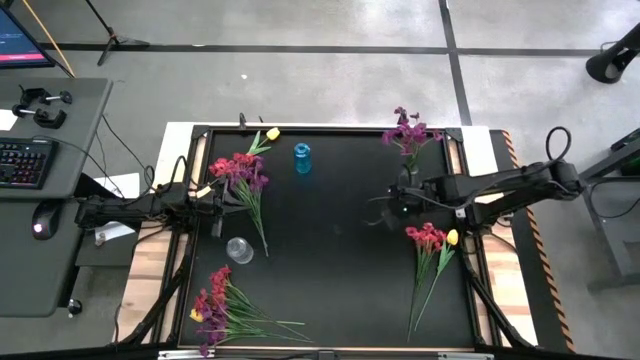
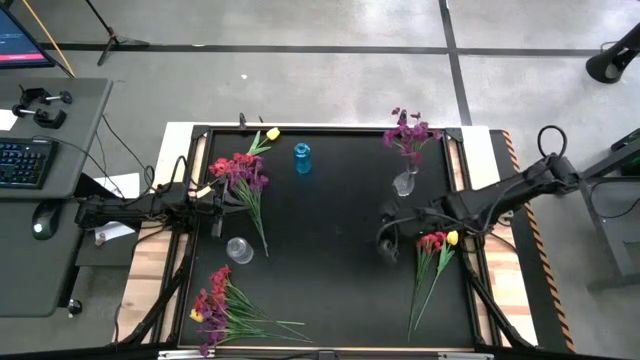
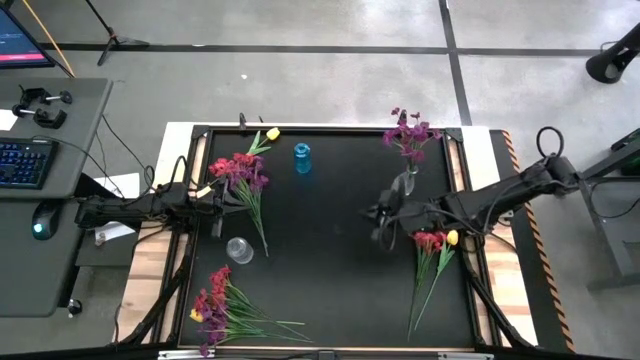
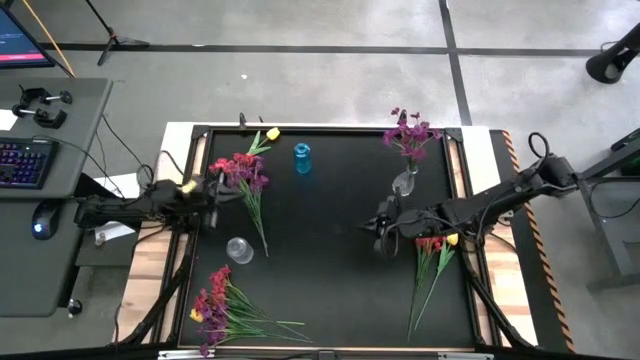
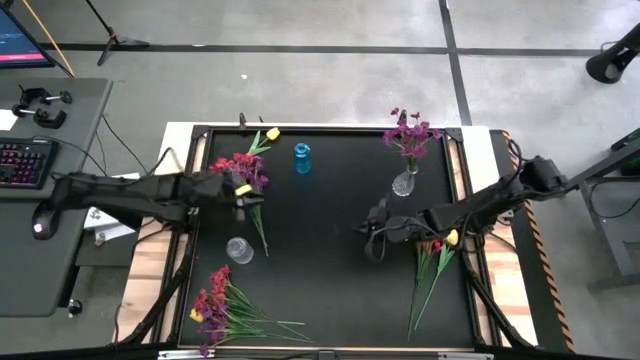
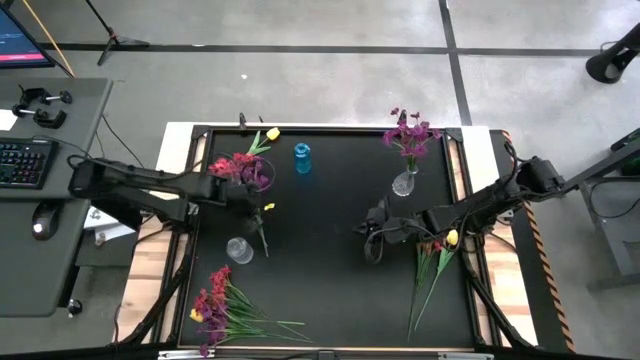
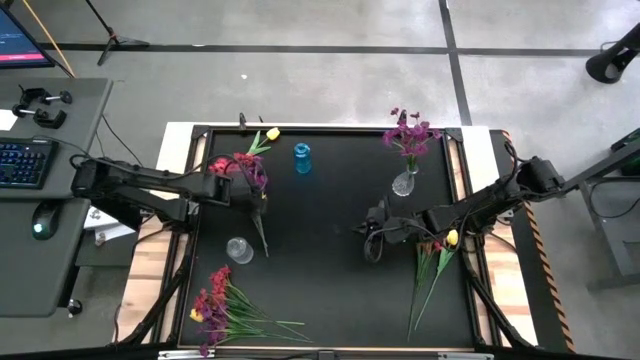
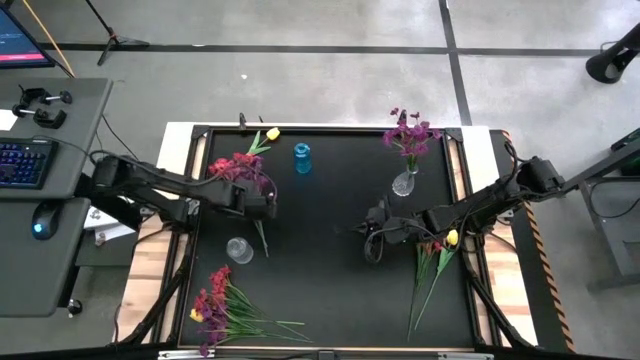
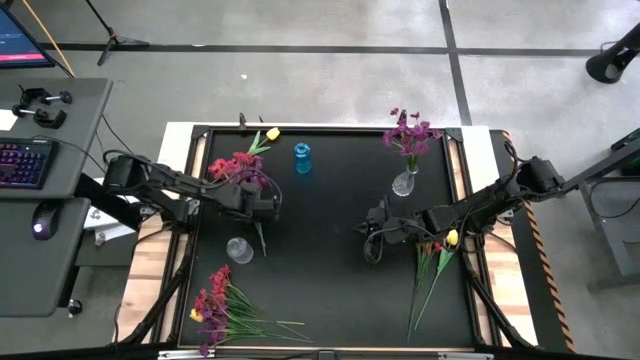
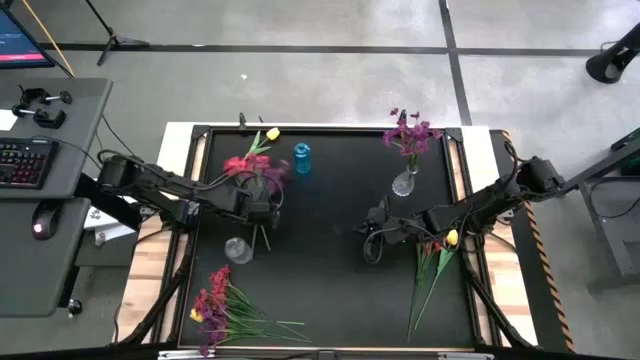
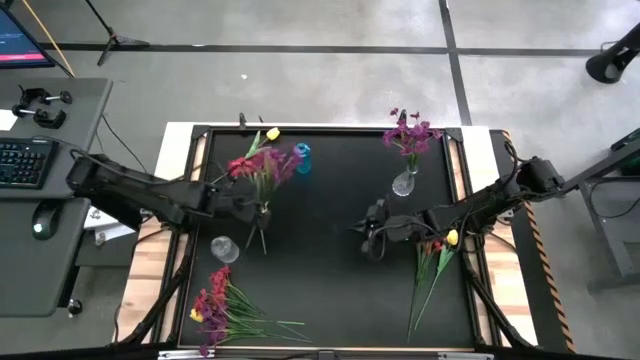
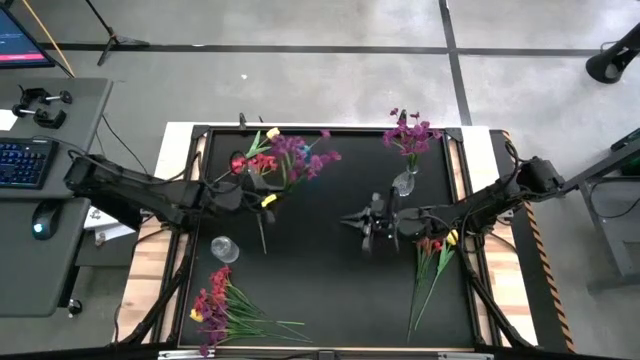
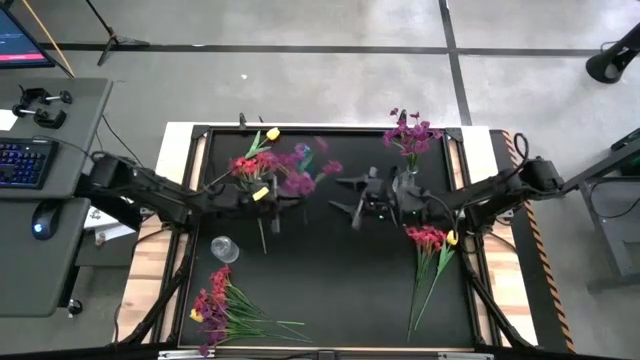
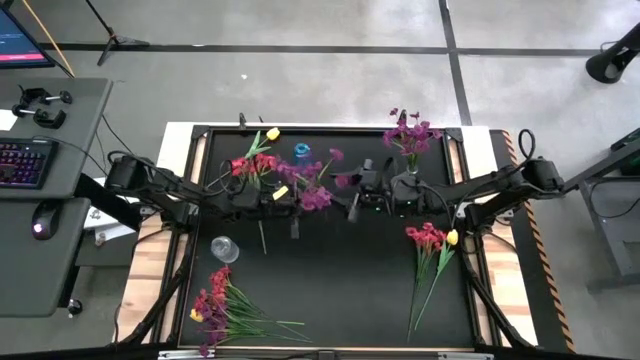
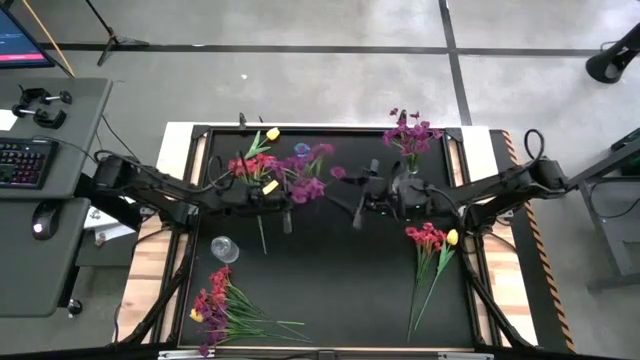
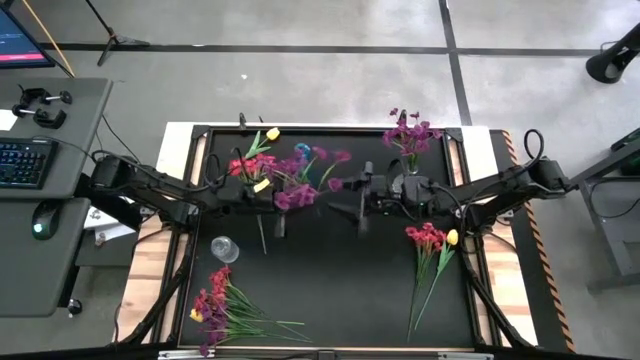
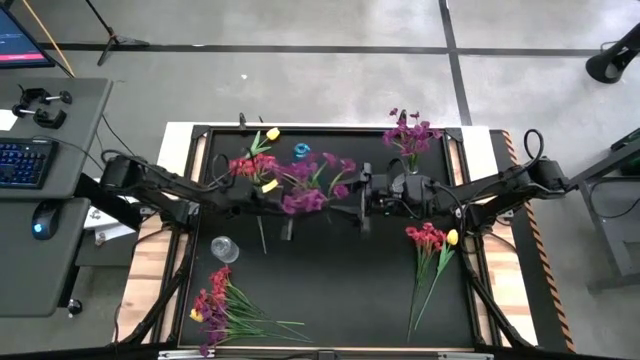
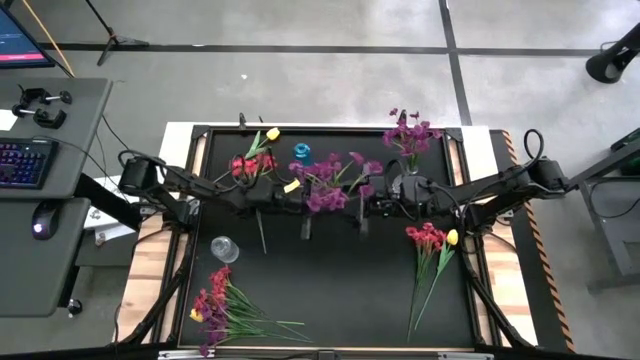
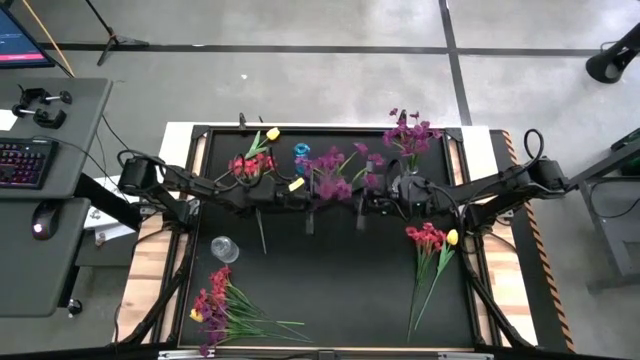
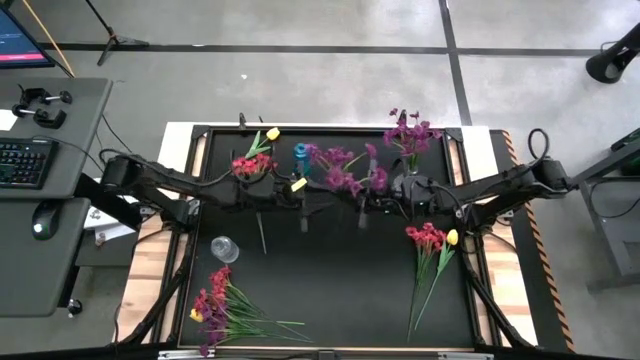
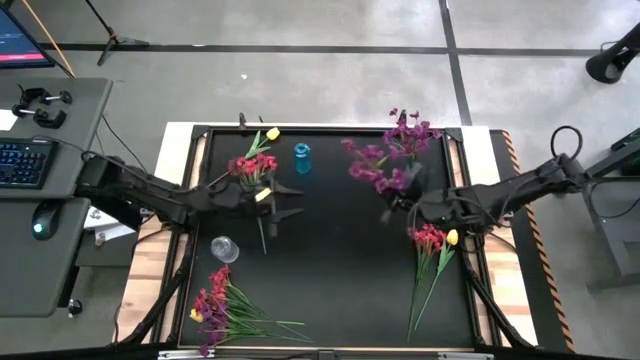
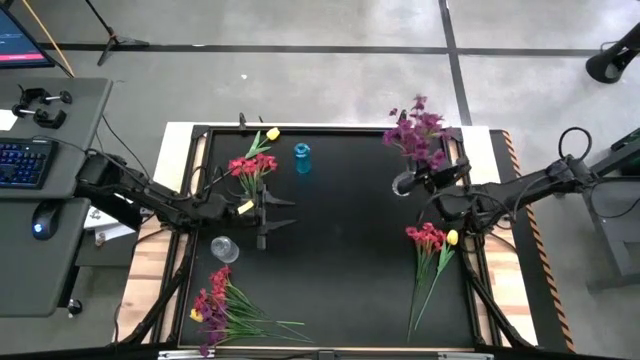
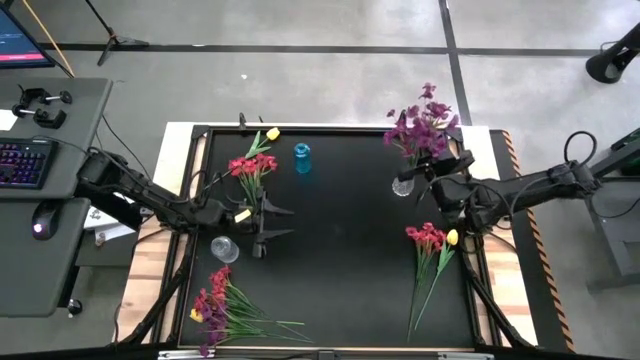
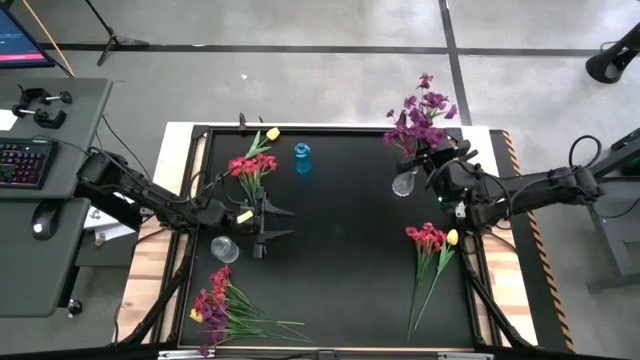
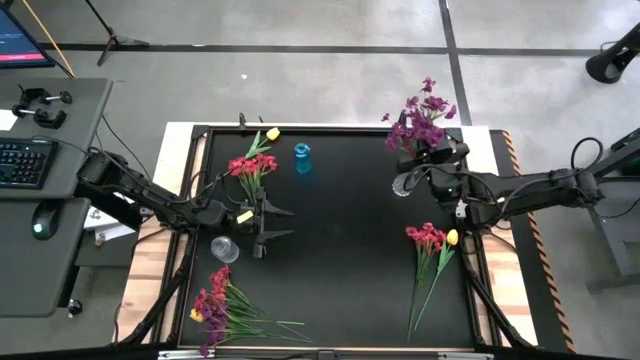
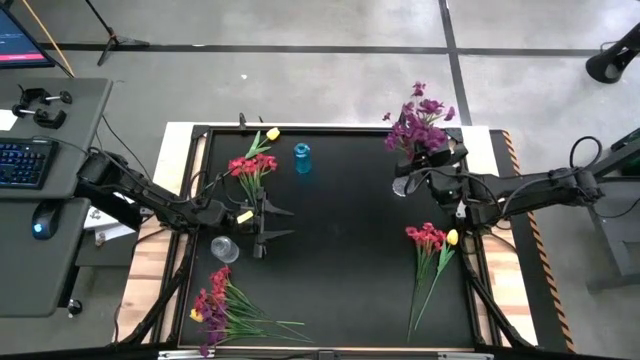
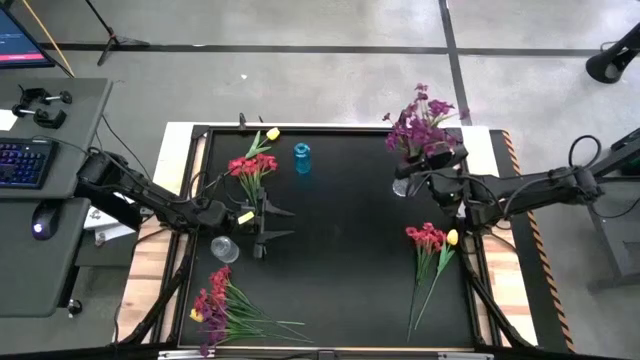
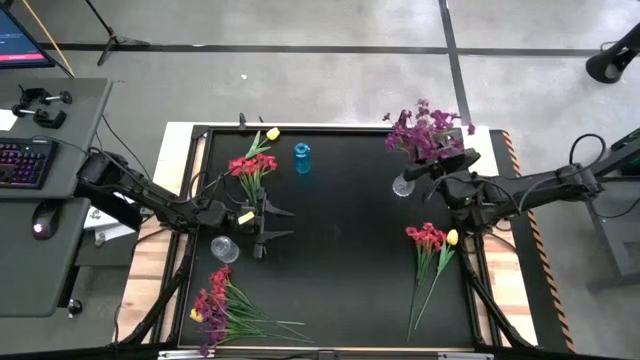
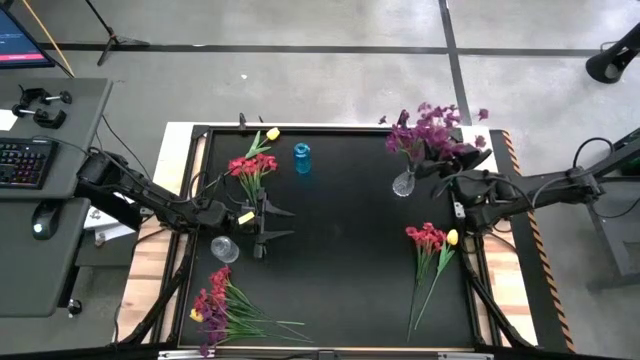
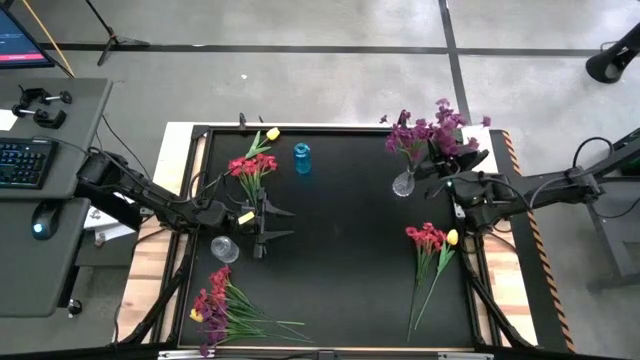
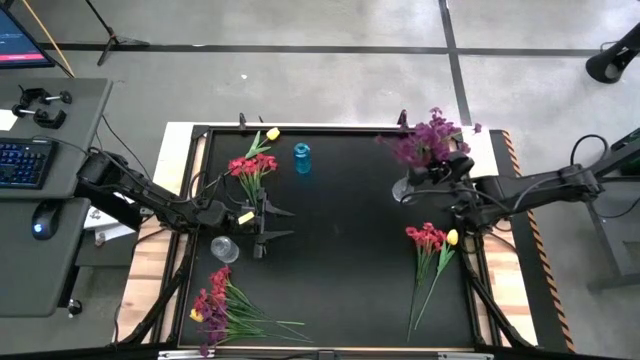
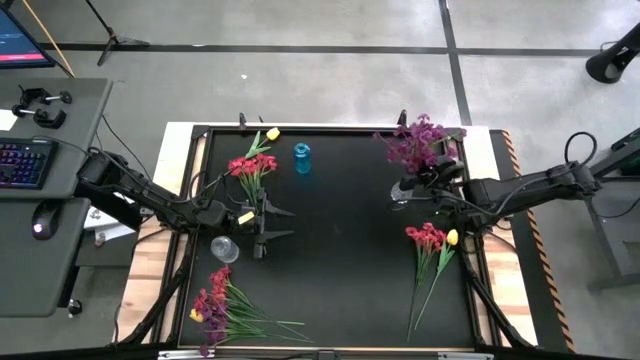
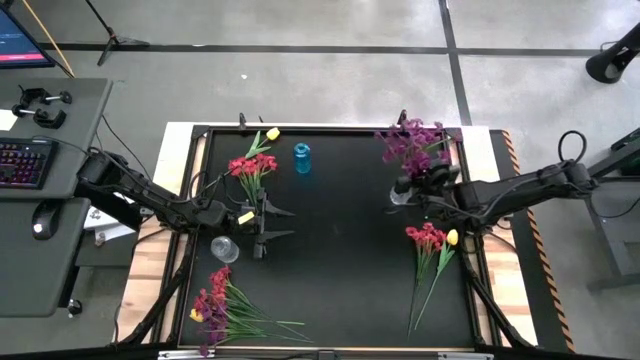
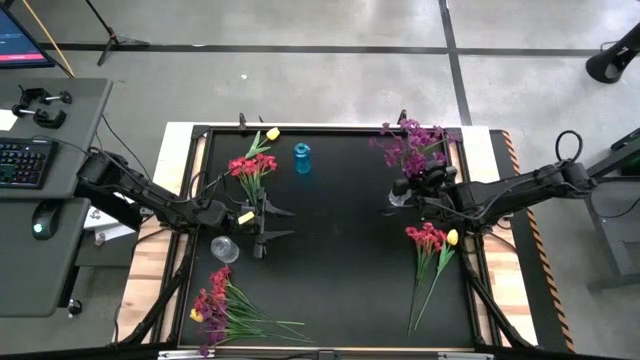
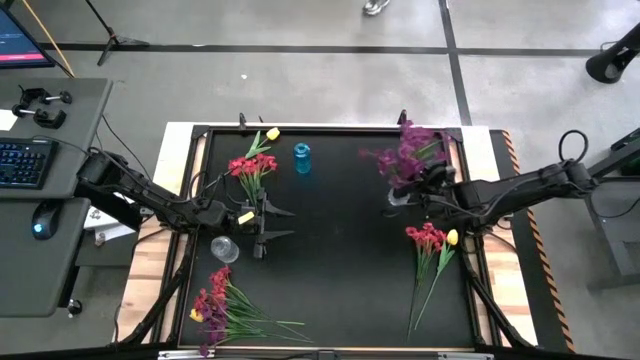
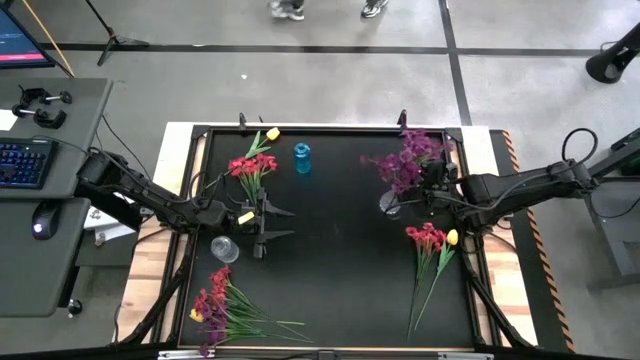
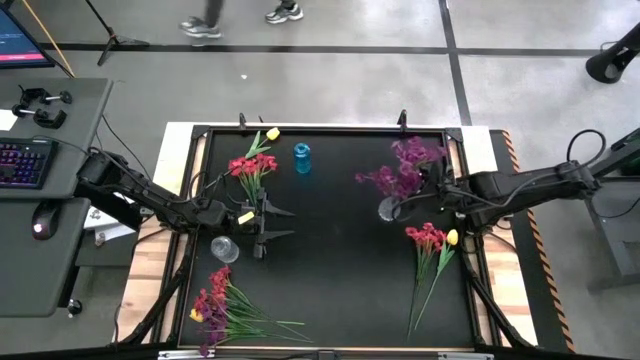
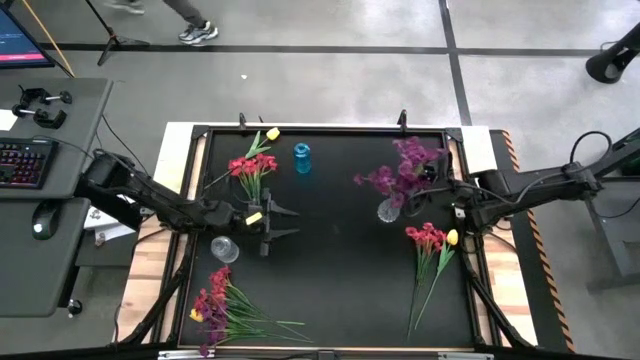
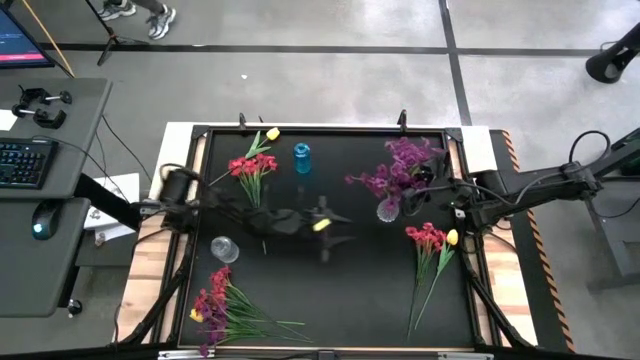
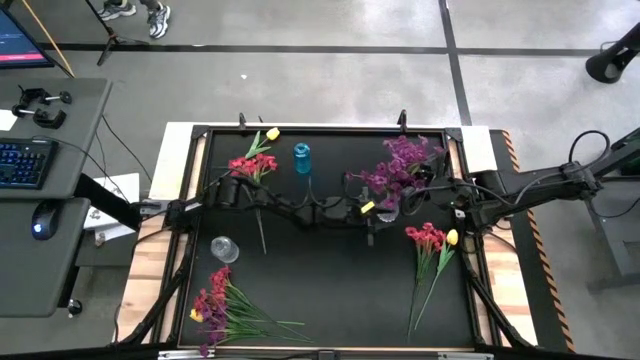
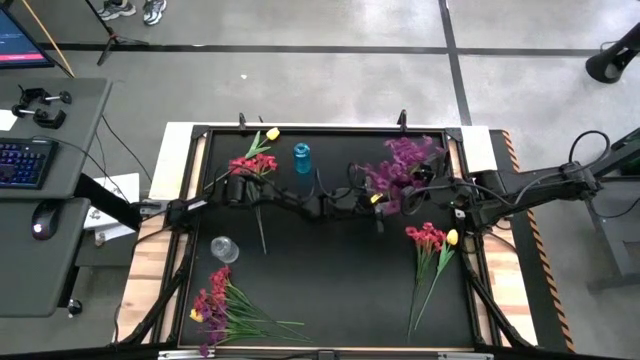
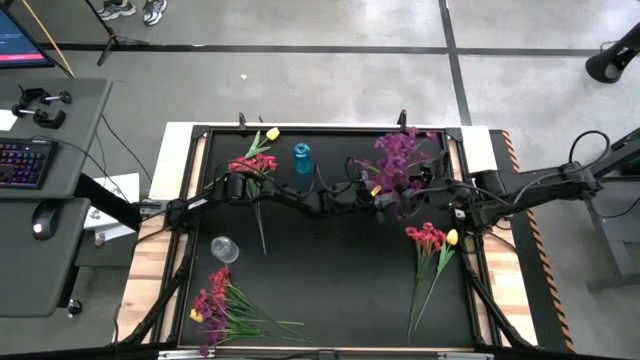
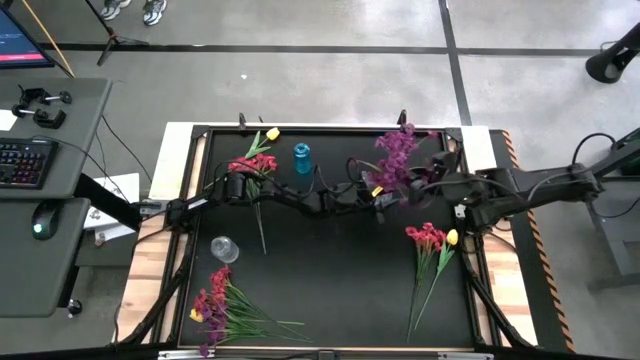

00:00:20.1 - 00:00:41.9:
Task: Sort flowers into vase by color
Put the top violet flowers into the right transparent vase
